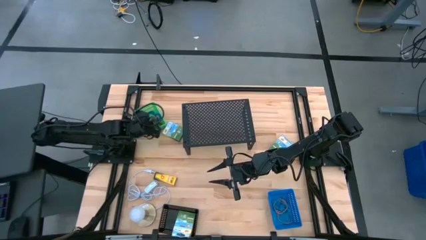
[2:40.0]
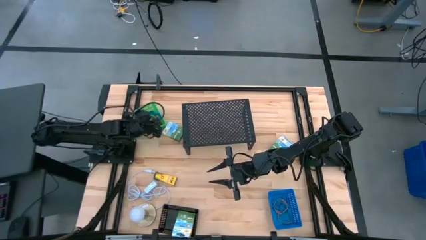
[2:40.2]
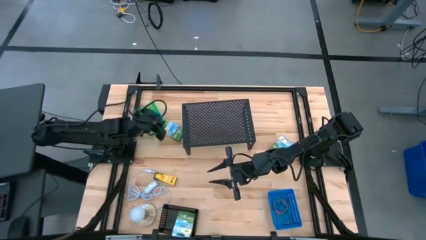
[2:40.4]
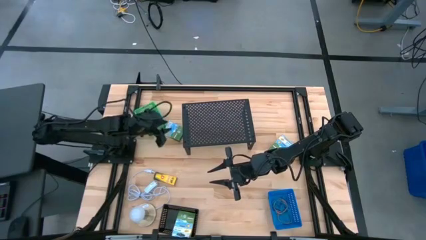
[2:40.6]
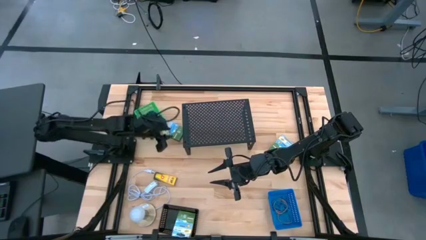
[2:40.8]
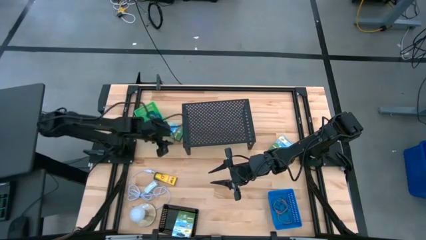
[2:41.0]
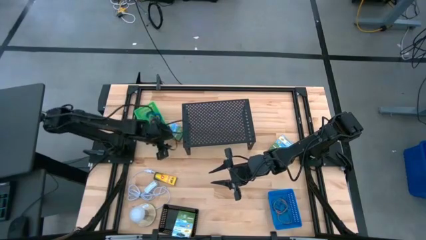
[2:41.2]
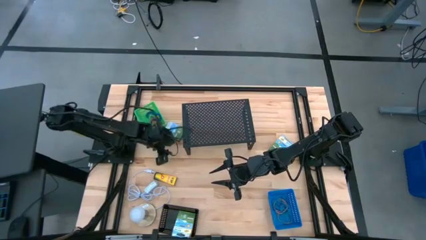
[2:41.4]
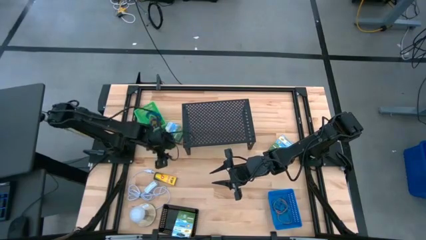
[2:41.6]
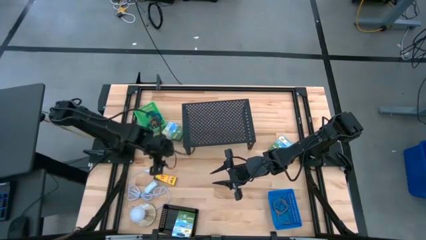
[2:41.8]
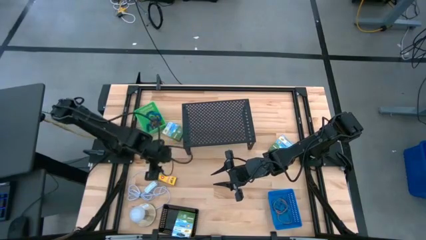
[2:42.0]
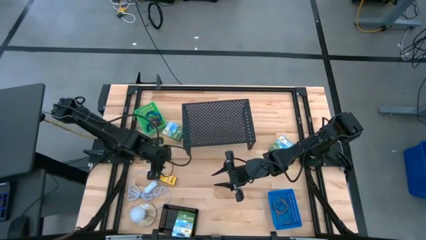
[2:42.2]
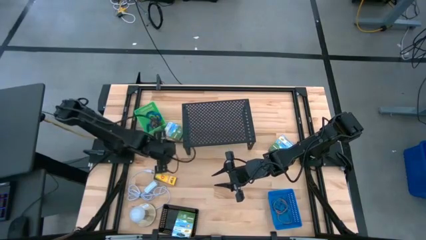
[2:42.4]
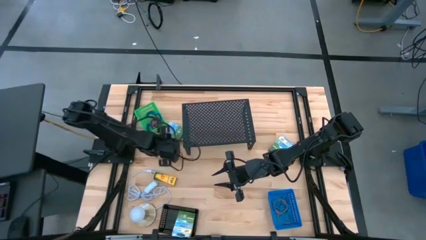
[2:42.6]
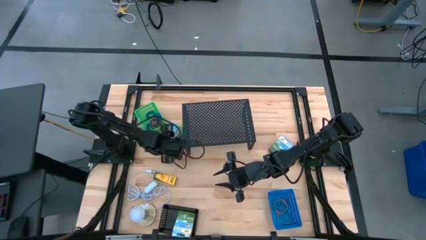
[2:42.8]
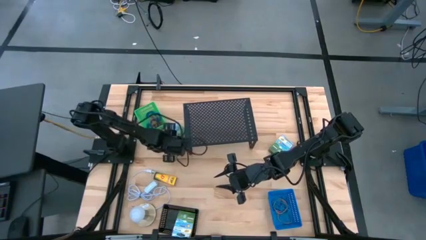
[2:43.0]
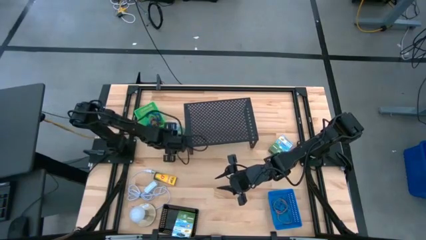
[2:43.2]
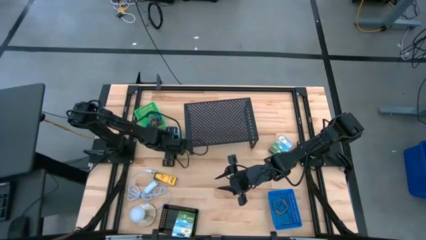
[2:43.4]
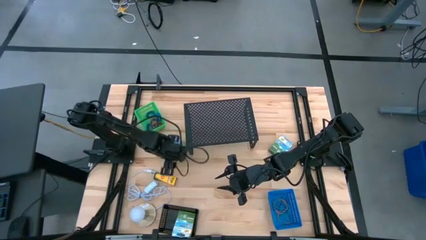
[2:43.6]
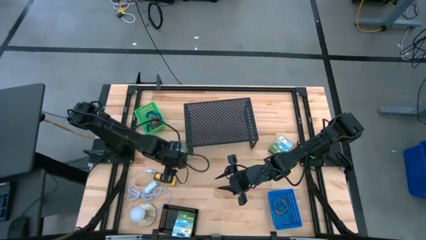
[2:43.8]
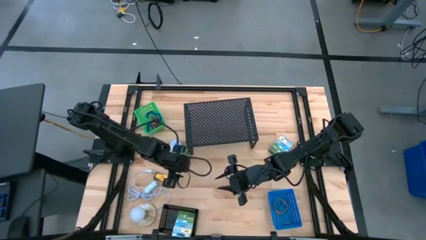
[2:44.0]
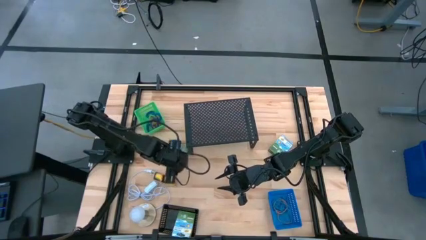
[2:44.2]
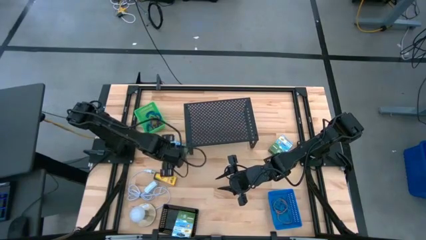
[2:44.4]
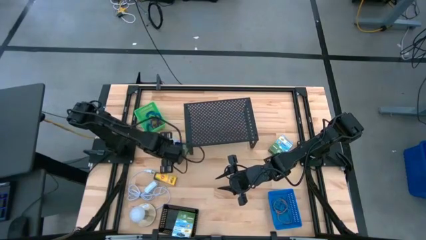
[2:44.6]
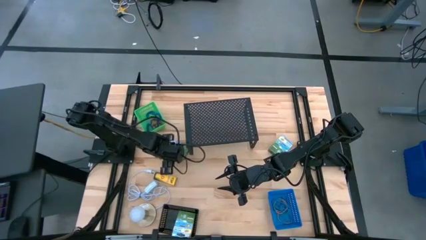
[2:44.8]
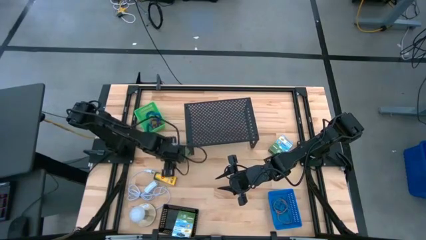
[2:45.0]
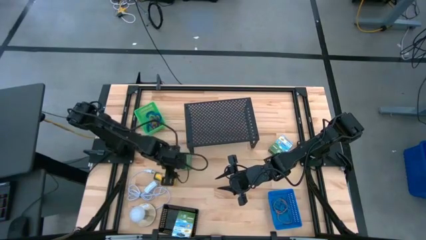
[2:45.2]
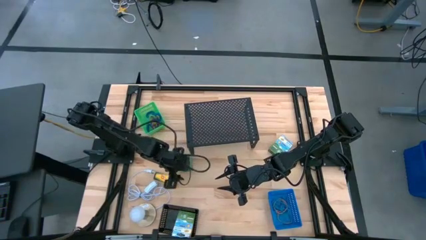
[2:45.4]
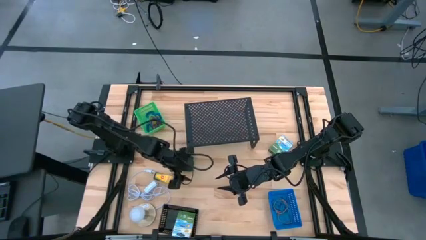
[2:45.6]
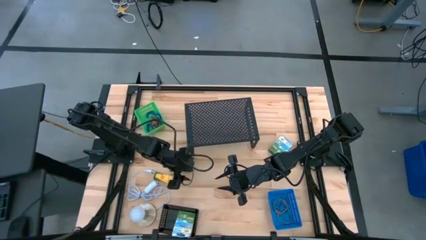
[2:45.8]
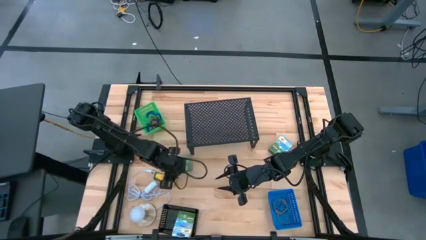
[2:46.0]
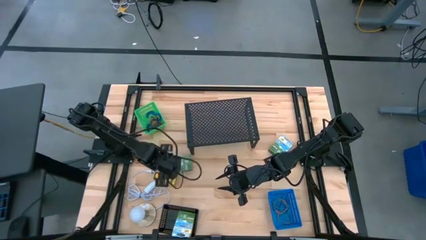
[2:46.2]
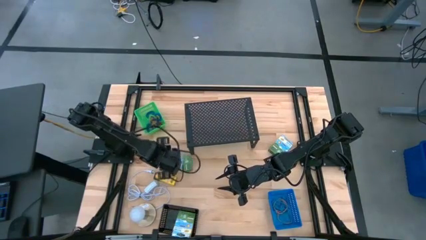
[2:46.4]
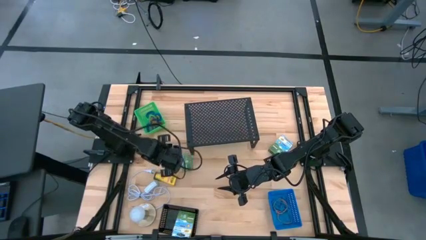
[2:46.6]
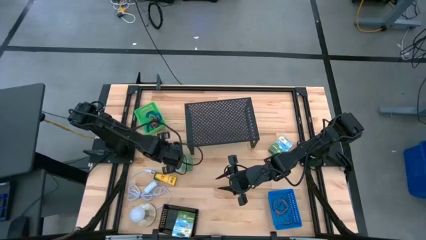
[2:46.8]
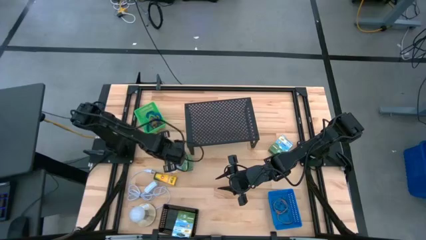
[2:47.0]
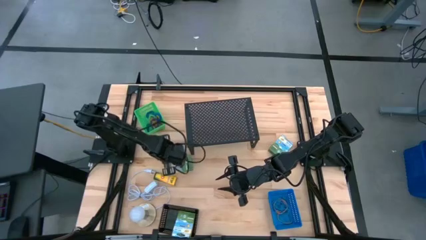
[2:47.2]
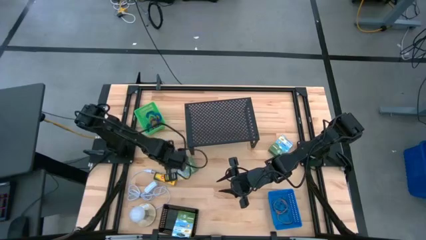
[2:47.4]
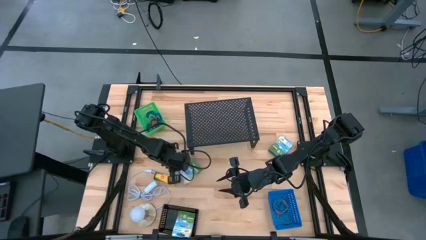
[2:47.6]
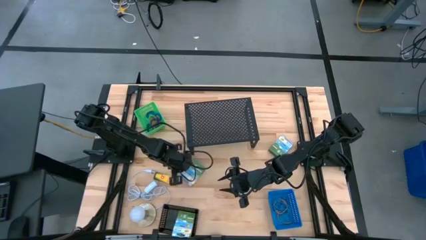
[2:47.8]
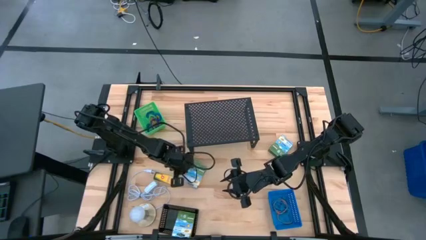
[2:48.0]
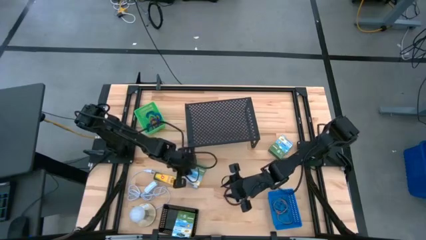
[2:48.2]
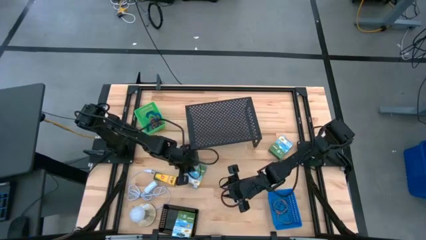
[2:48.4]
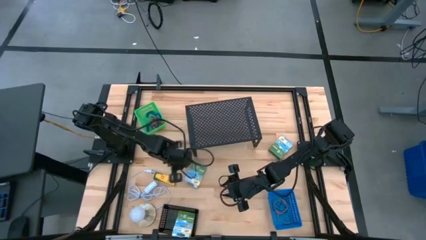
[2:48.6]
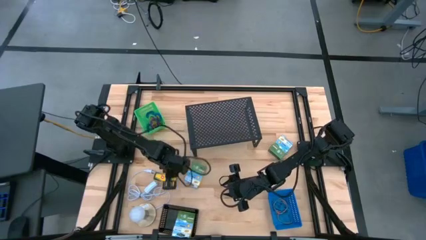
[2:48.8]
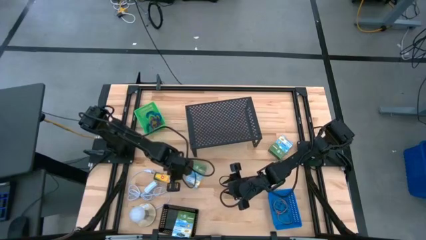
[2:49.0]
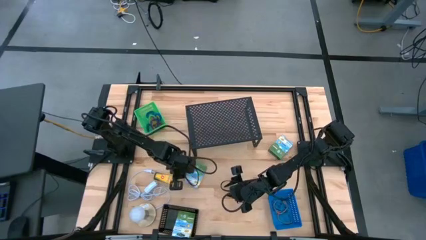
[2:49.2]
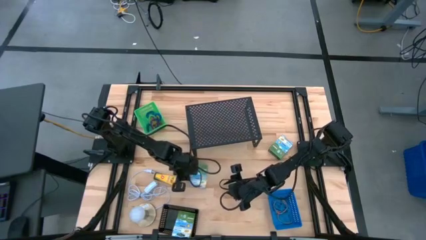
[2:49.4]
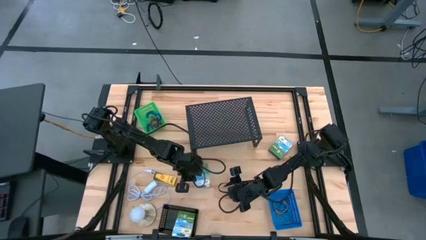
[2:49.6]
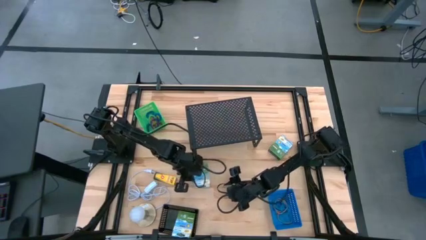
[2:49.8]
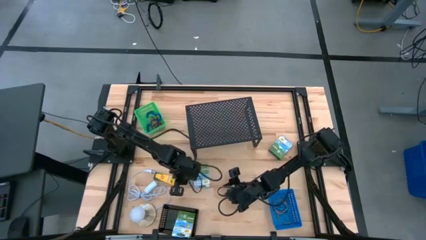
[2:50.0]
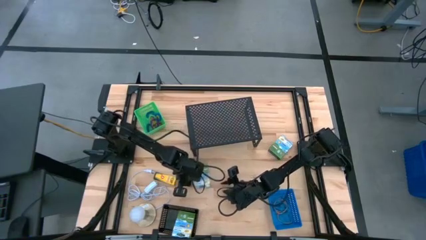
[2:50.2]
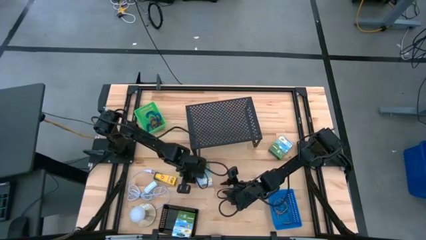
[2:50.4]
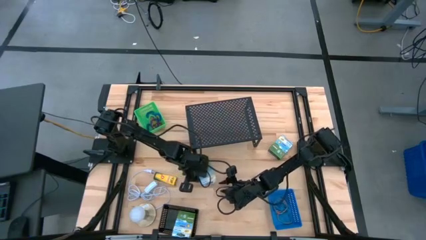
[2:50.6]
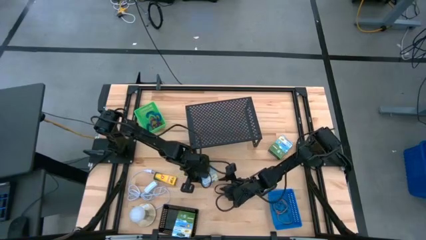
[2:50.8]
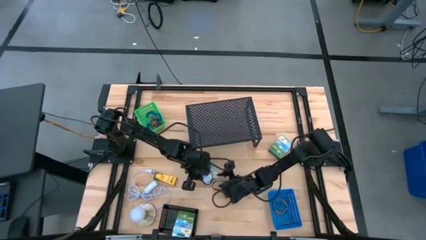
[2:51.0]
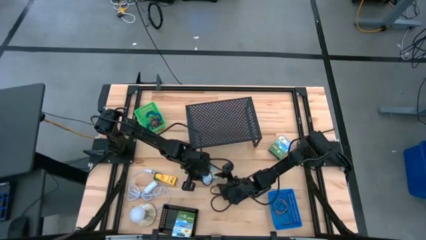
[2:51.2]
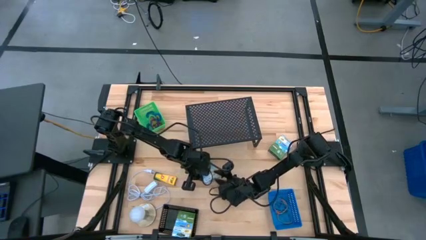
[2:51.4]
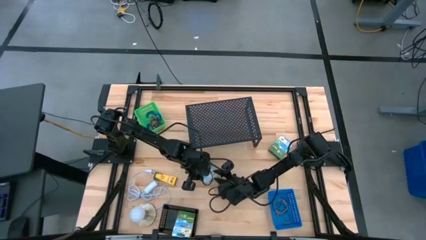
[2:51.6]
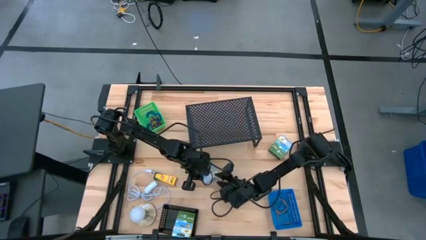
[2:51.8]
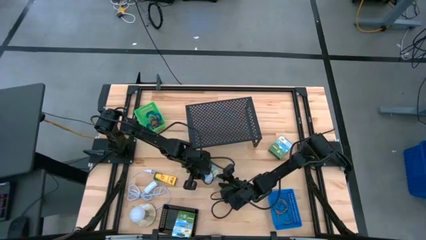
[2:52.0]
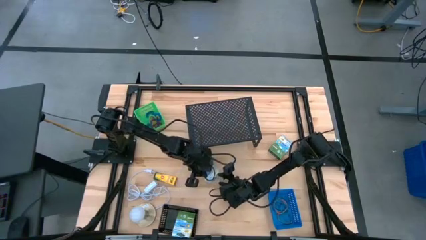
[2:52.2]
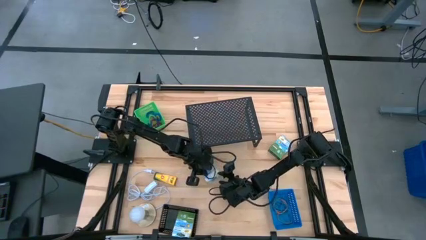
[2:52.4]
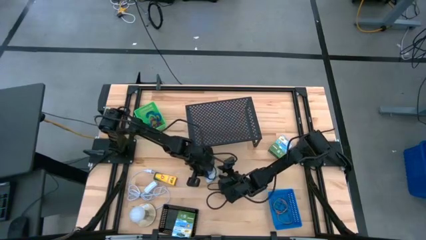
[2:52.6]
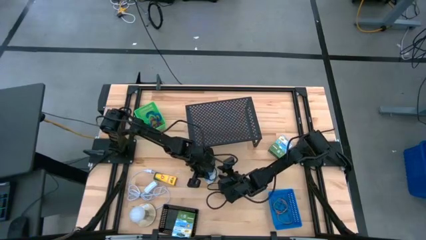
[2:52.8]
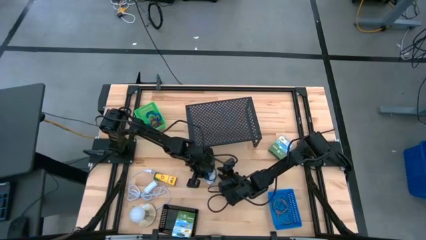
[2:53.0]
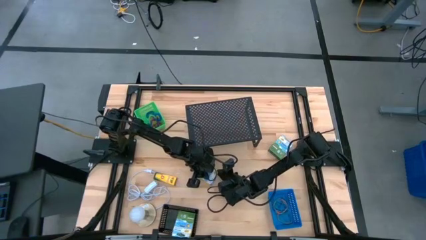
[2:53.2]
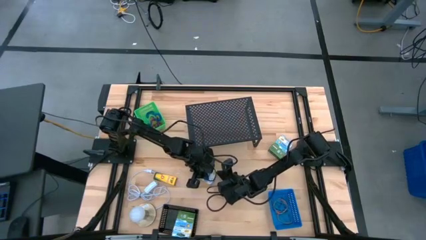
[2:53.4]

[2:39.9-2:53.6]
Task: Pick & Place Office Desk Supplies
Put the yellow crayon box into the black bin

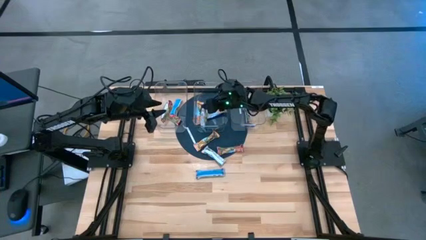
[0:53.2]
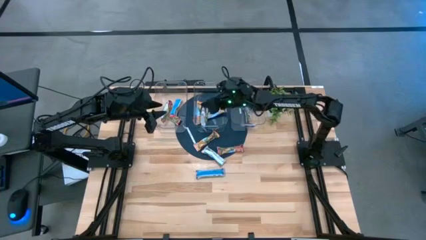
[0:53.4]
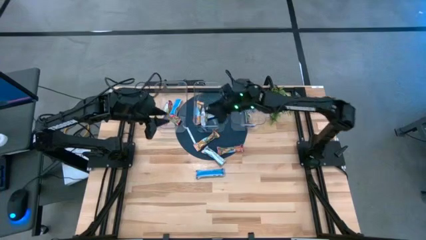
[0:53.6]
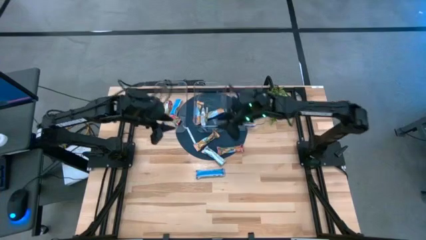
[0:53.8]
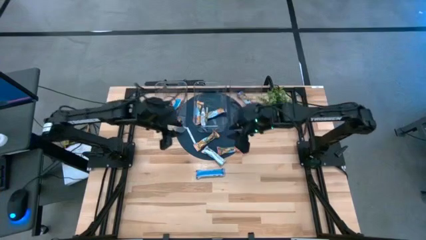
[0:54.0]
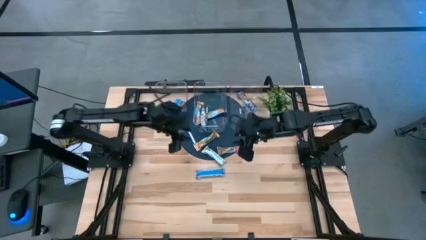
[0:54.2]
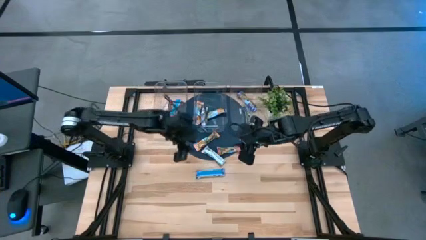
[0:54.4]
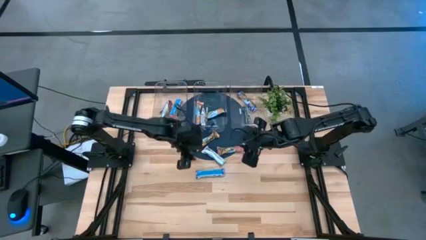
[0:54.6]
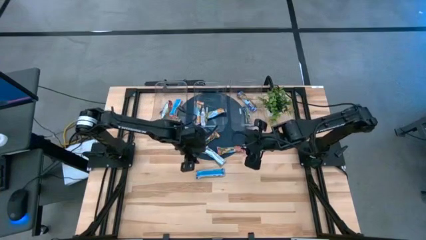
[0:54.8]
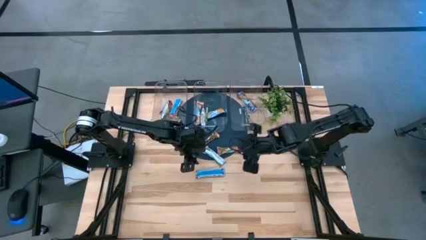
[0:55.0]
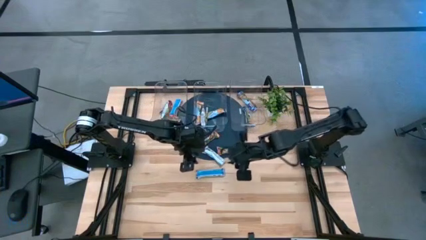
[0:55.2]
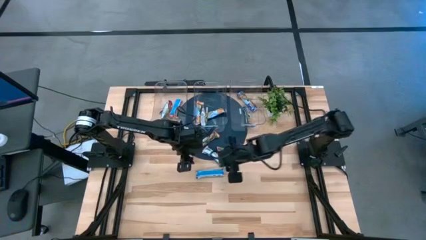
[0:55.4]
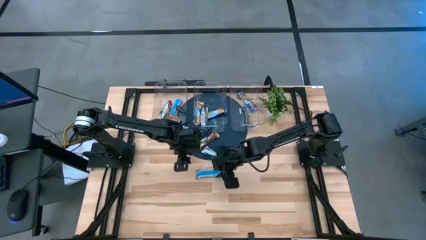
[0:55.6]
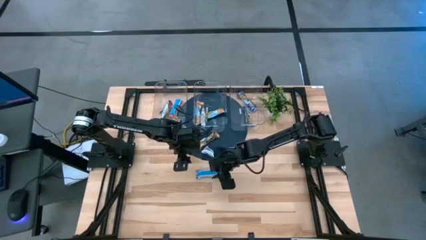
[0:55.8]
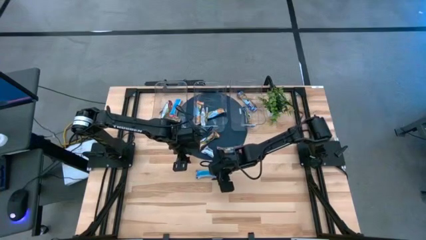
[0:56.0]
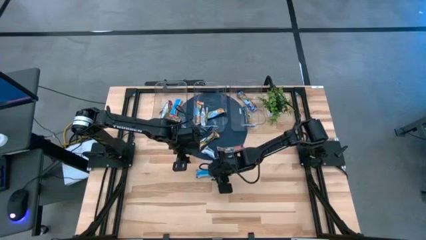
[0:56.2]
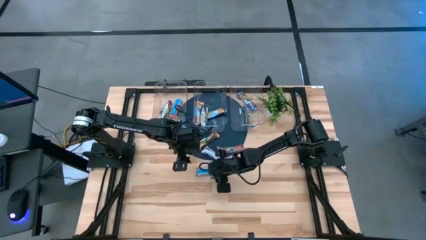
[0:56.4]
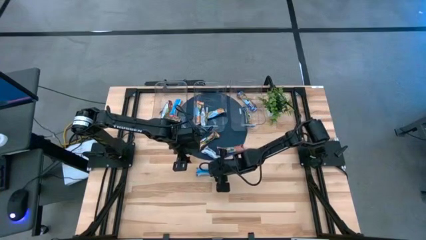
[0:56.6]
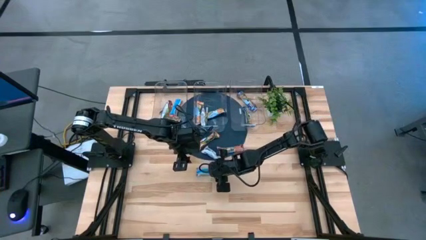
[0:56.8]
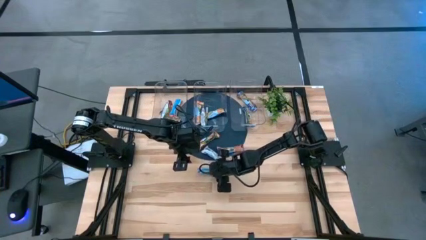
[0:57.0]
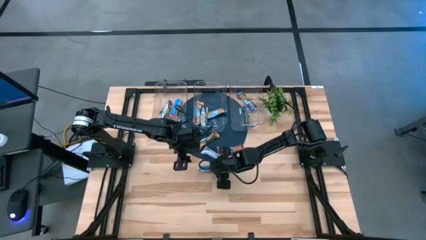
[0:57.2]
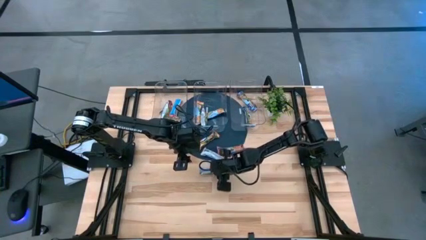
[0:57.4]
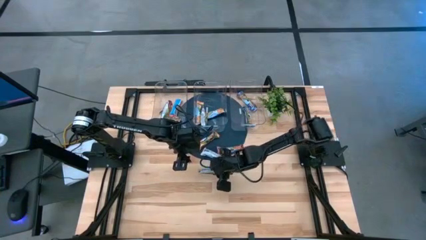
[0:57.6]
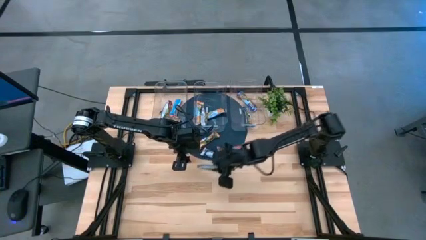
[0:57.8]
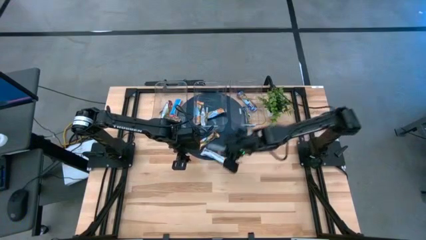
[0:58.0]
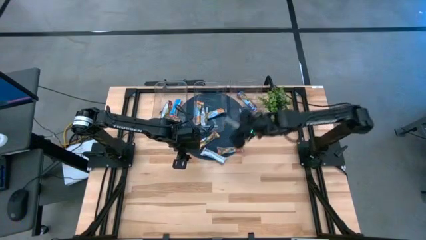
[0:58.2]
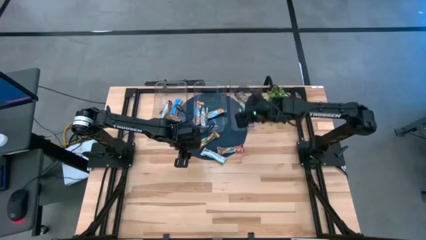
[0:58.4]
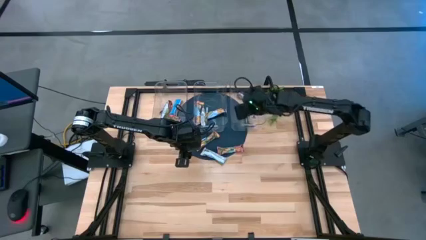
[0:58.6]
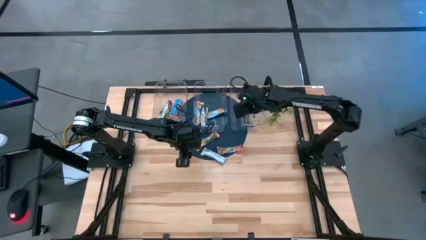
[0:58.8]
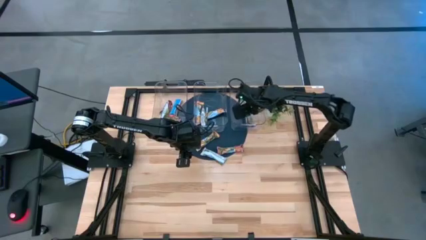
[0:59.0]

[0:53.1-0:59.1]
Task: Pick and place Granola Bars by type
Put the blue granola bar into the right transparent bin
